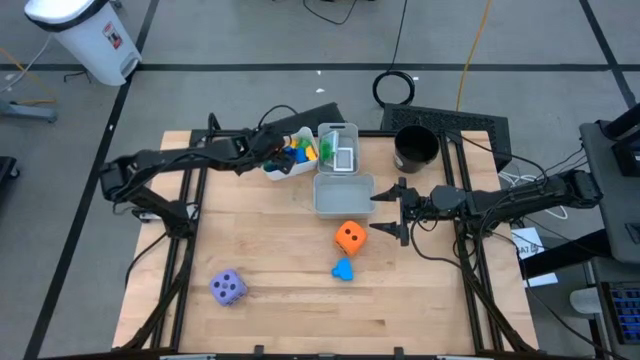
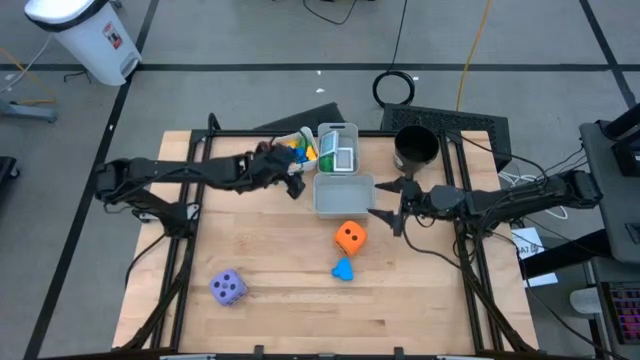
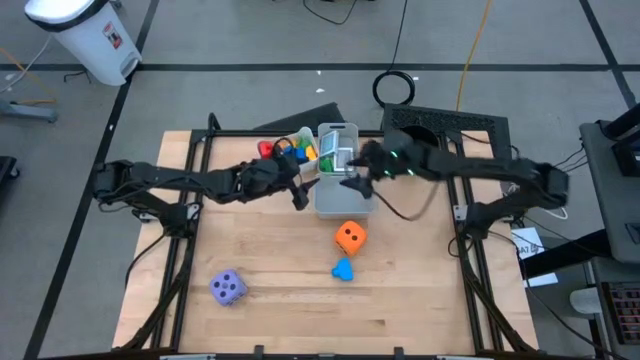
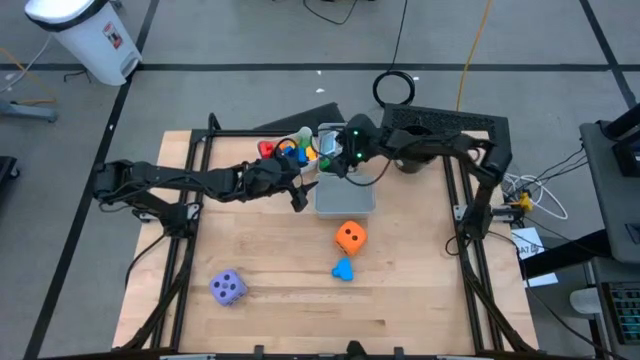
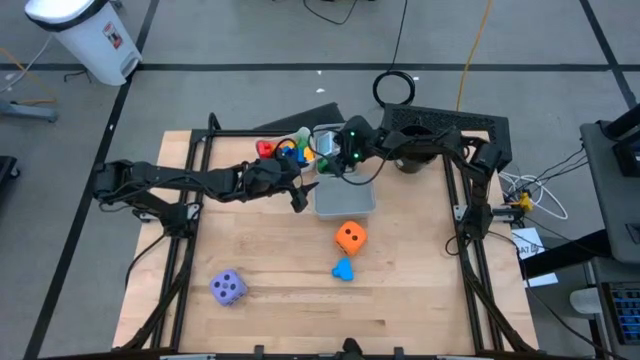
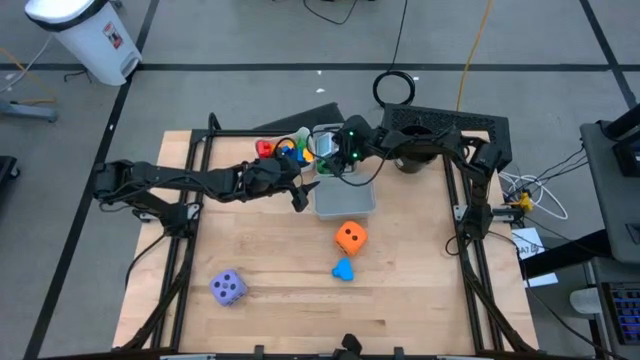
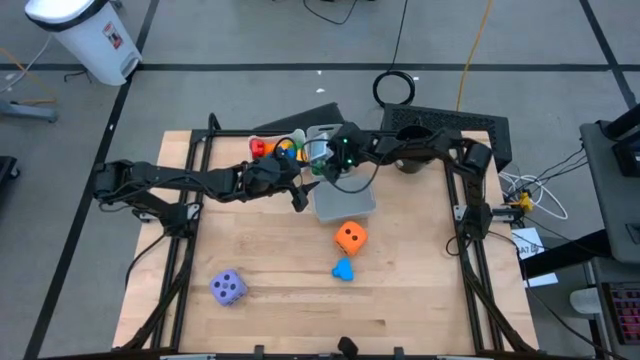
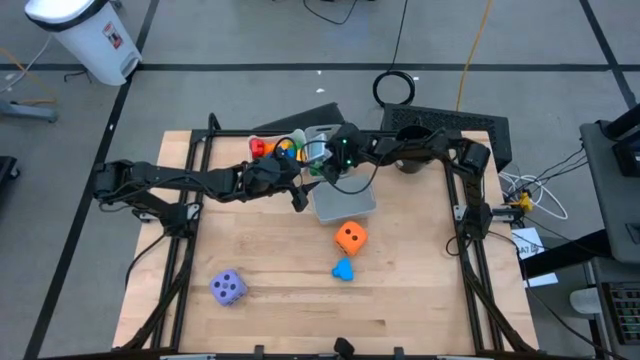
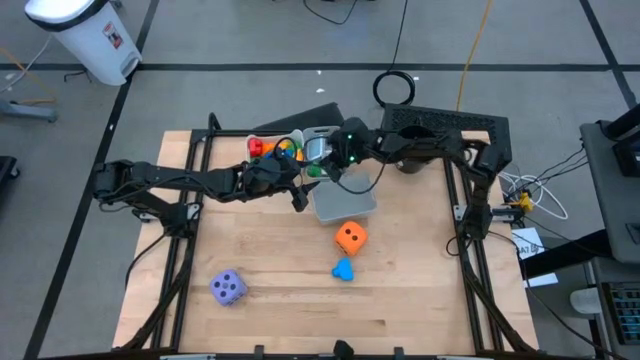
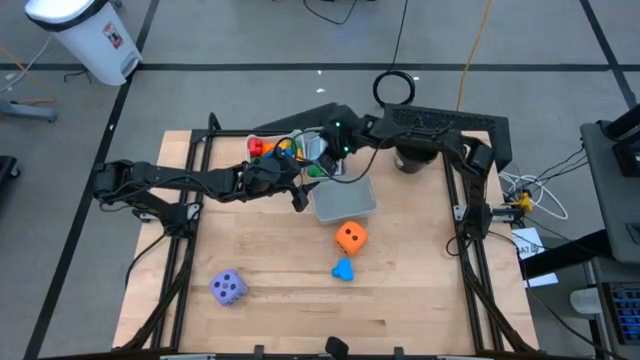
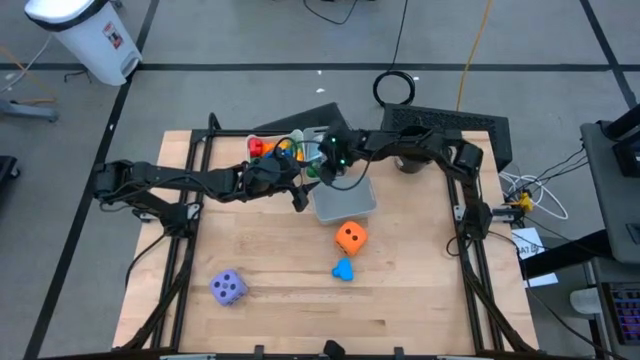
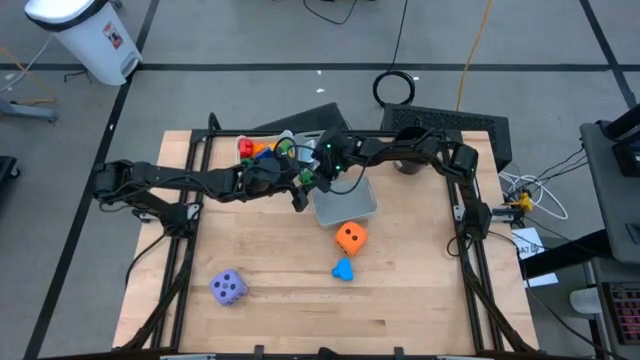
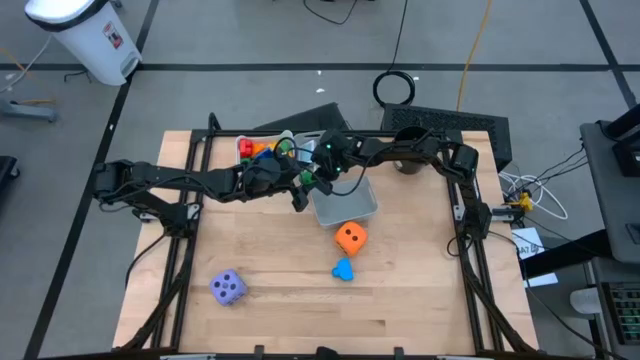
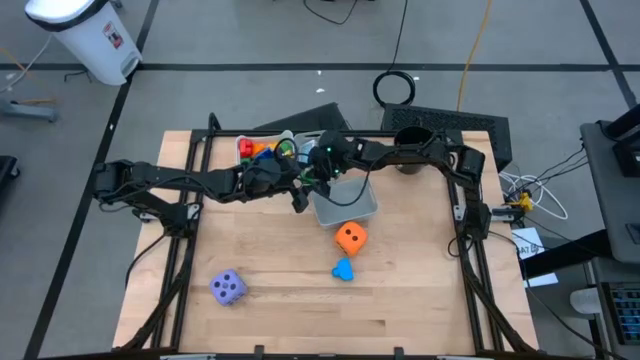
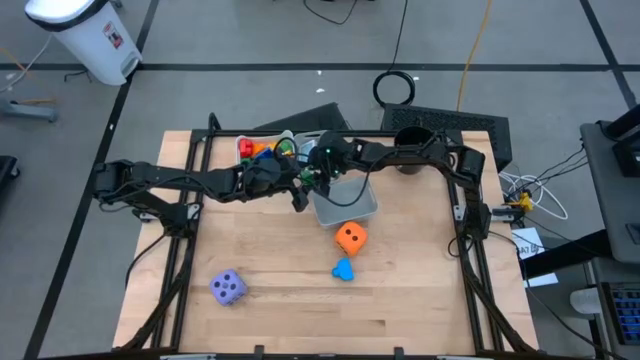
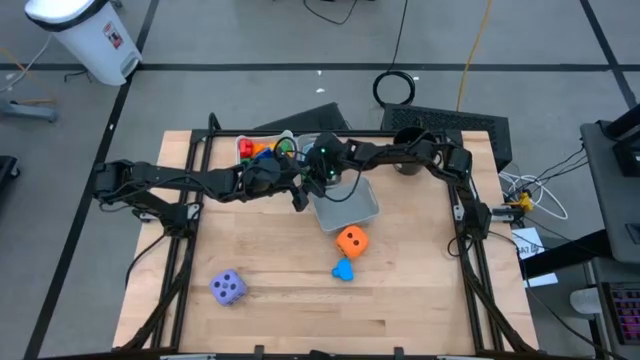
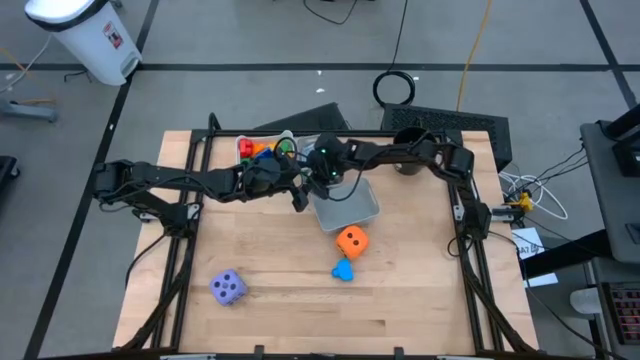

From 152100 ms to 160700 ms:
Task: Pick & Place Toys
Put the green game piece into the white bin

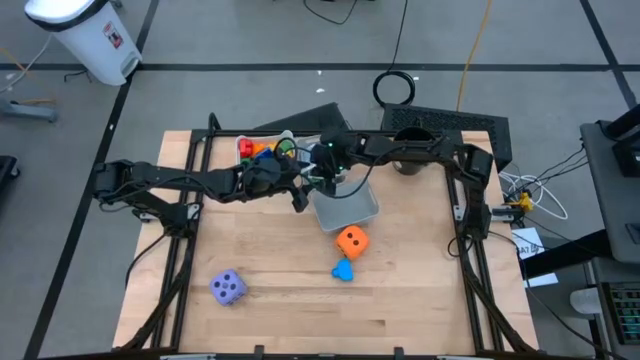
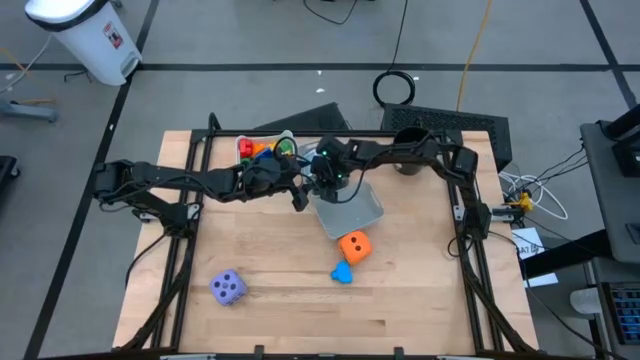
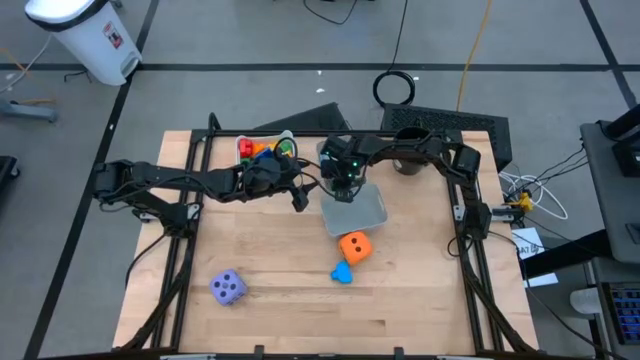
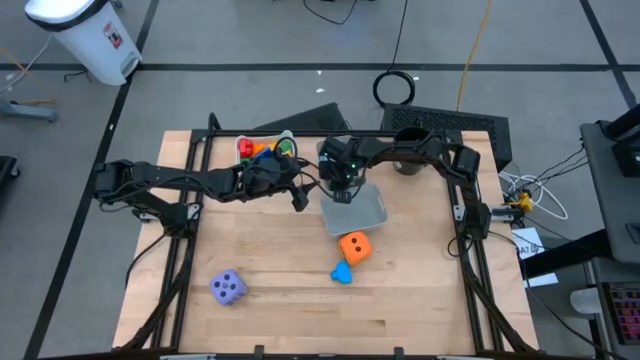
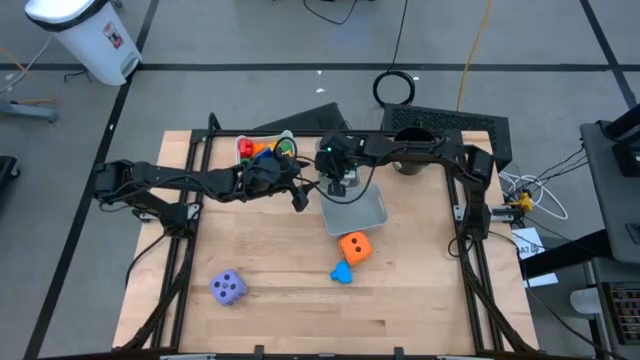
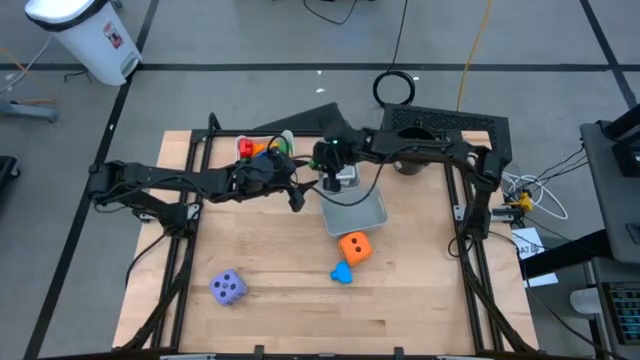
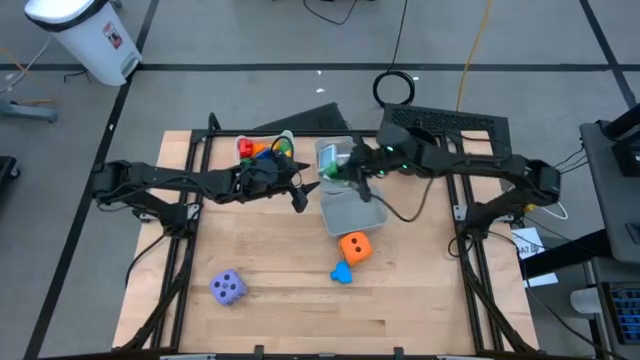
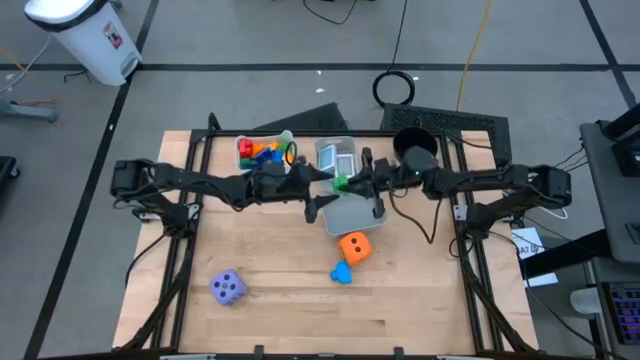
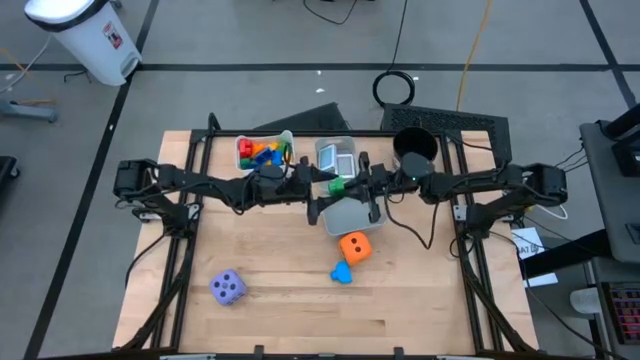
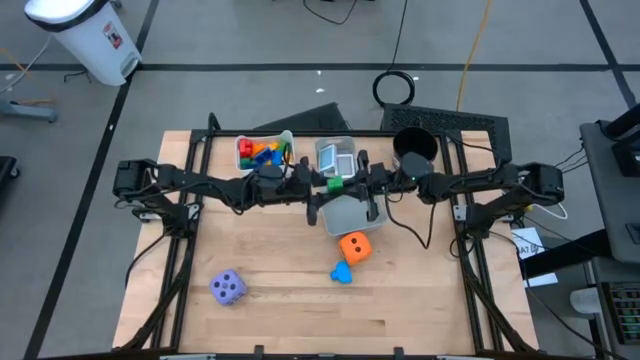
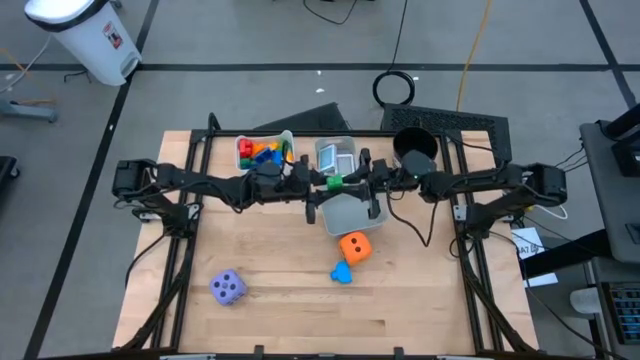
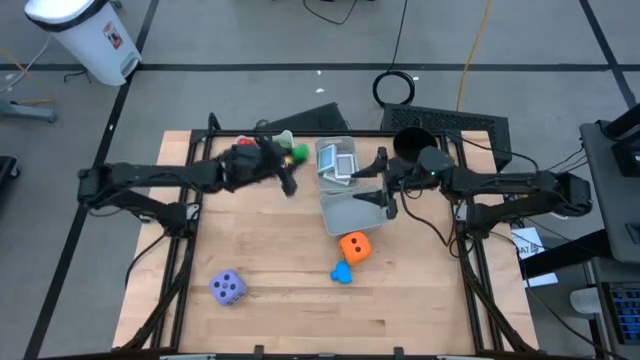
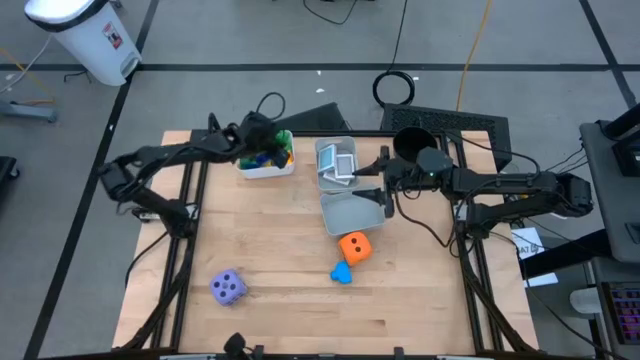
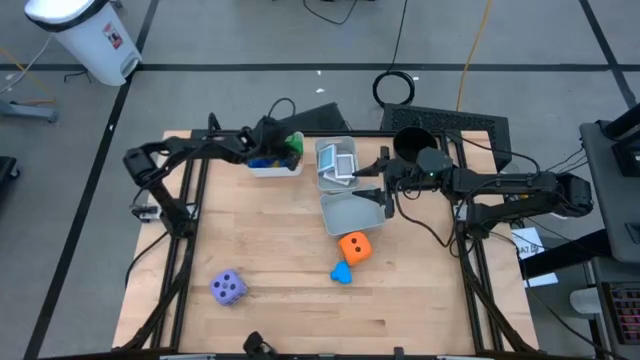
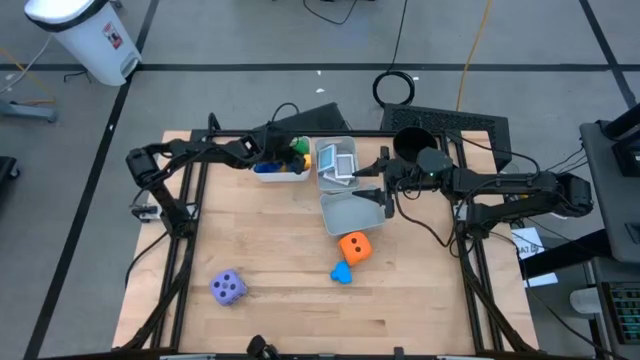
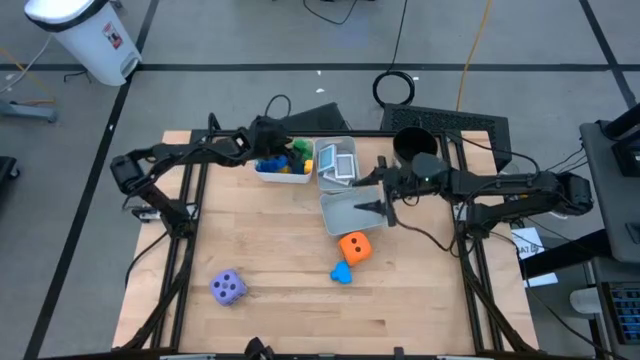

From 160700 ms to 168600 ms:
Put the green game piece into the white bin

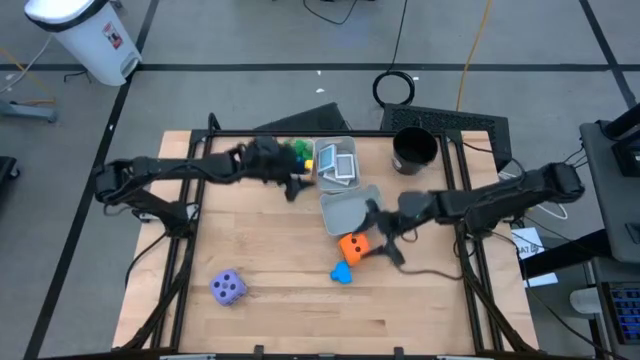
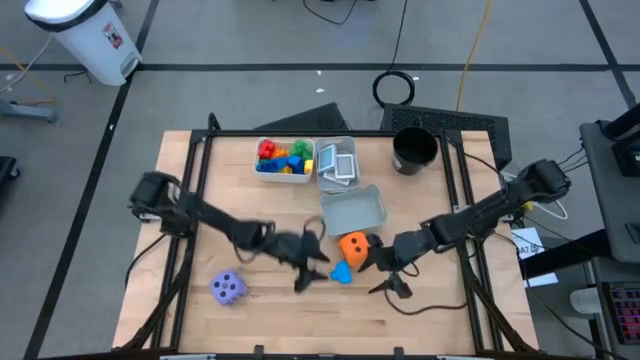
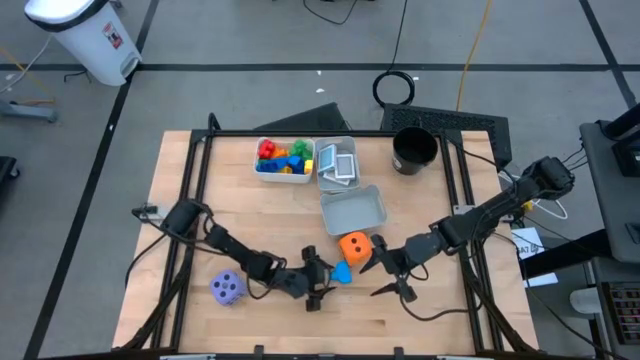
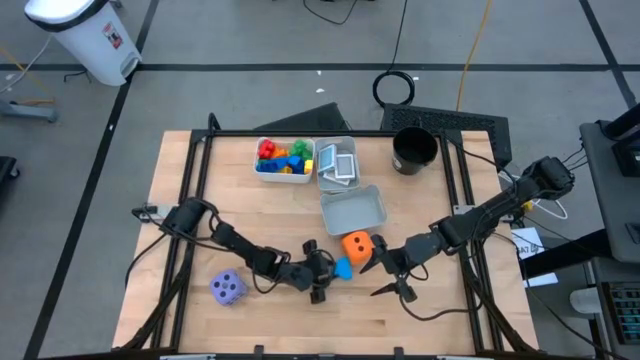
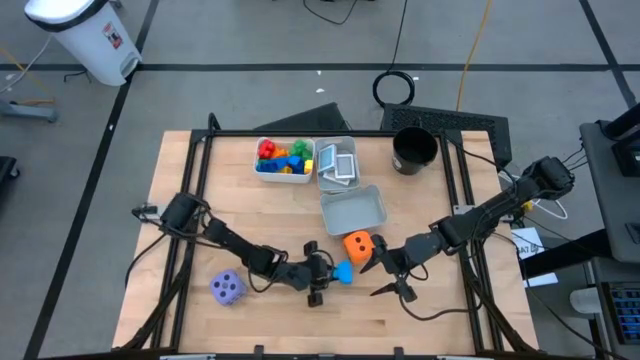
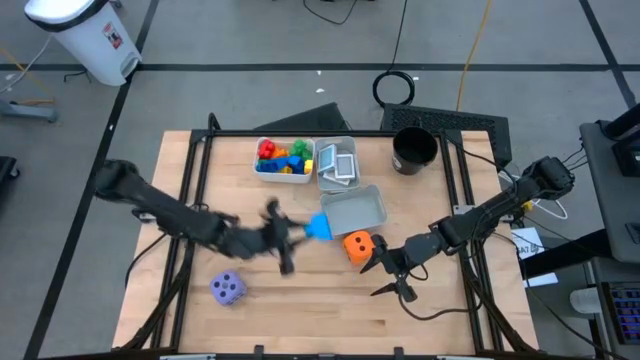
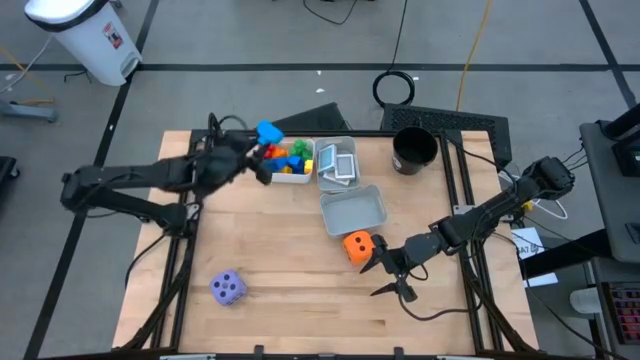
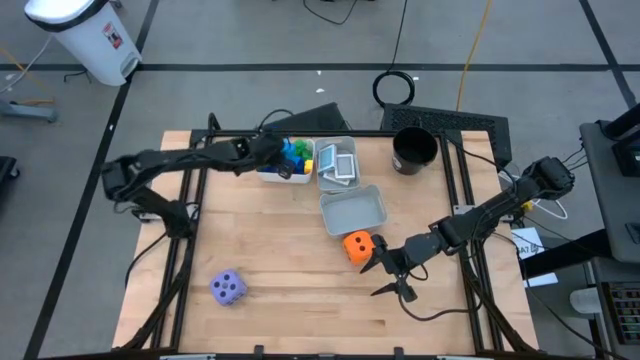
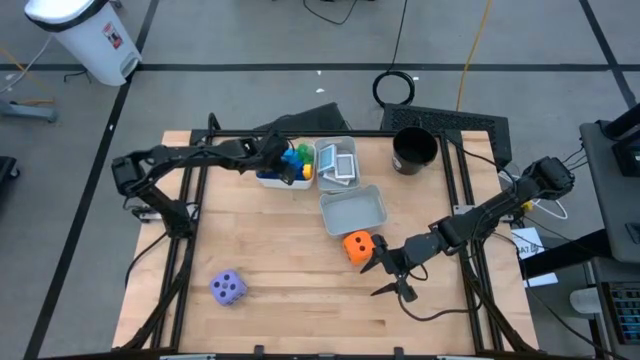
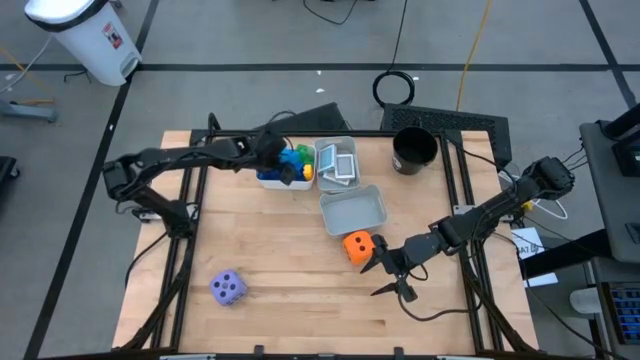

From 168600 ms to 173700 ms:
Put the blue game piece into the white bin
